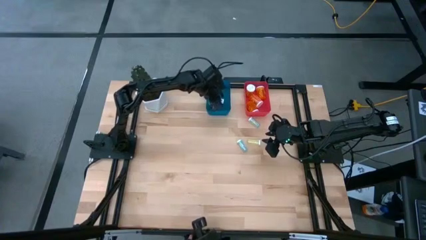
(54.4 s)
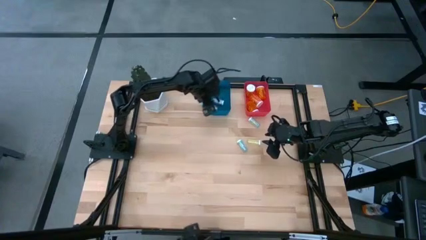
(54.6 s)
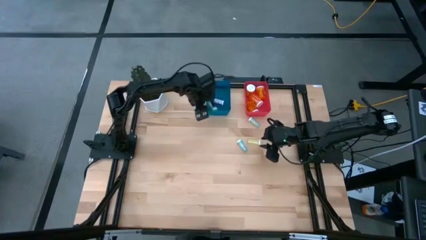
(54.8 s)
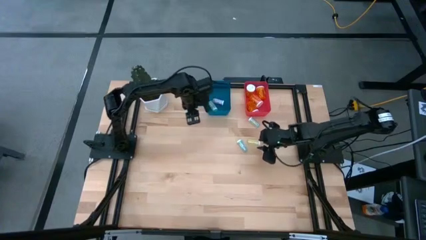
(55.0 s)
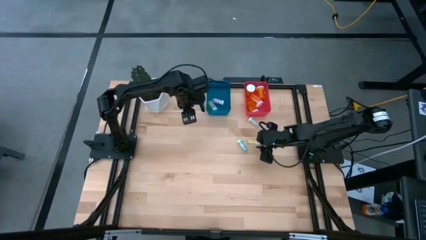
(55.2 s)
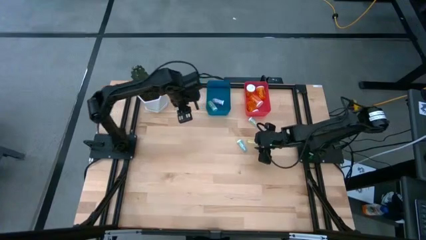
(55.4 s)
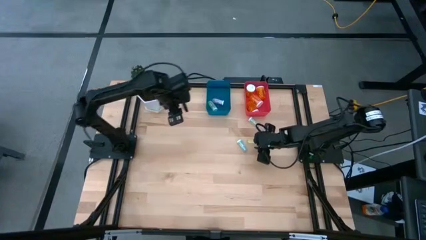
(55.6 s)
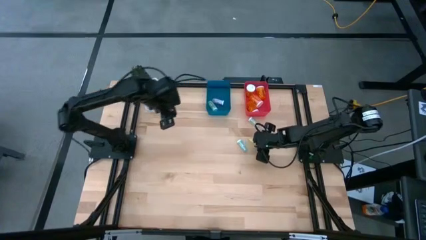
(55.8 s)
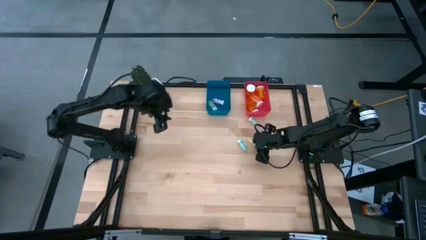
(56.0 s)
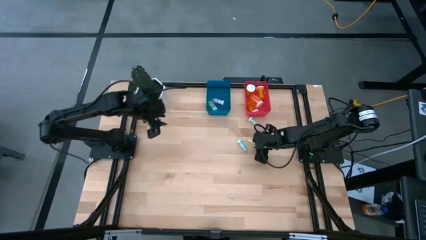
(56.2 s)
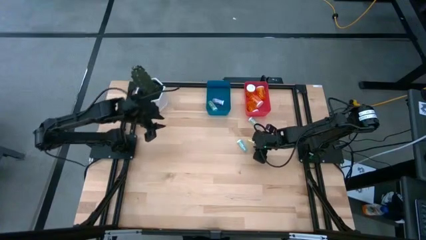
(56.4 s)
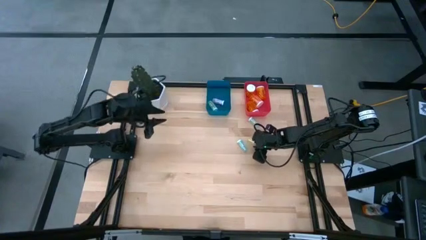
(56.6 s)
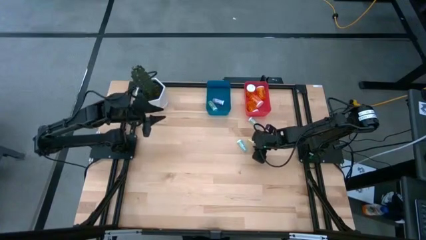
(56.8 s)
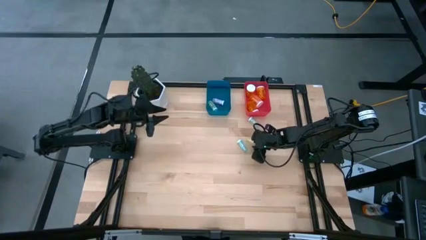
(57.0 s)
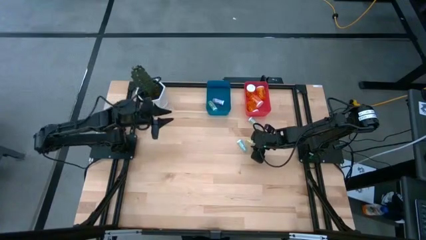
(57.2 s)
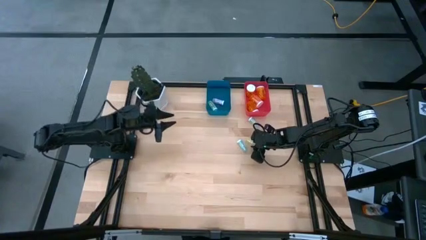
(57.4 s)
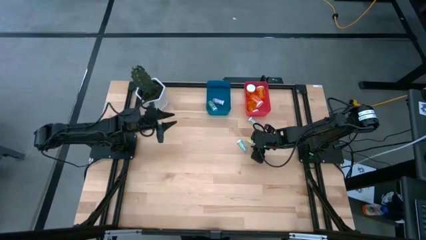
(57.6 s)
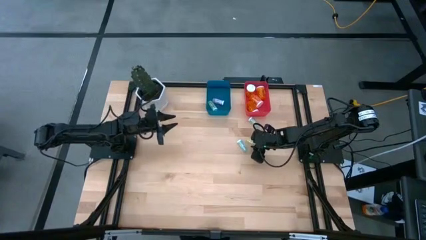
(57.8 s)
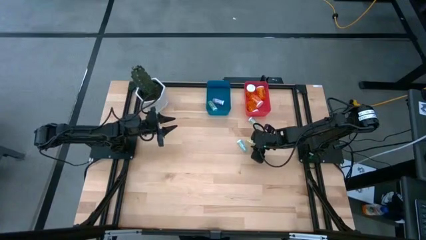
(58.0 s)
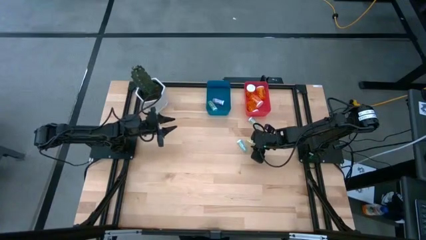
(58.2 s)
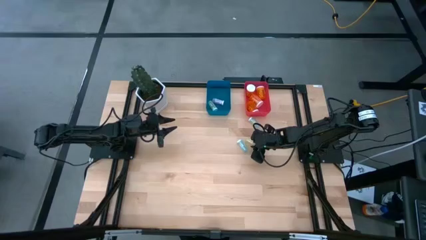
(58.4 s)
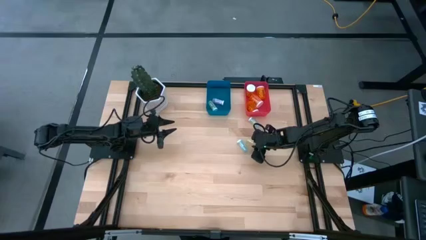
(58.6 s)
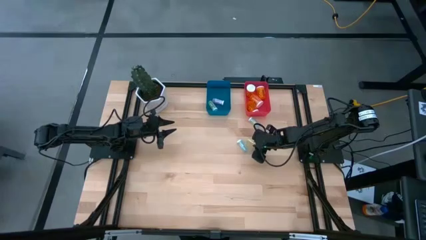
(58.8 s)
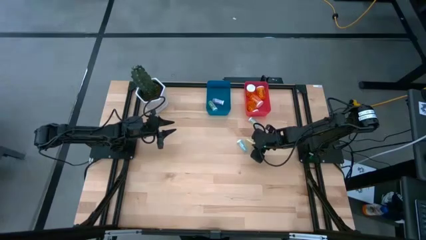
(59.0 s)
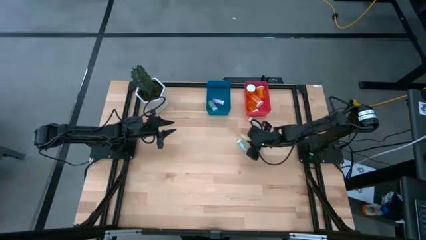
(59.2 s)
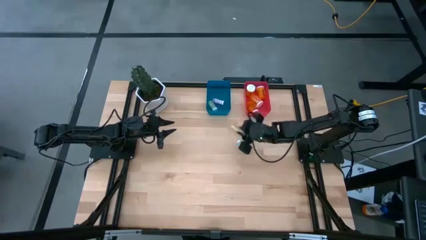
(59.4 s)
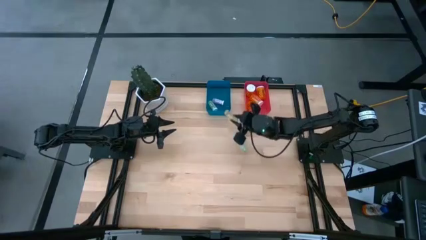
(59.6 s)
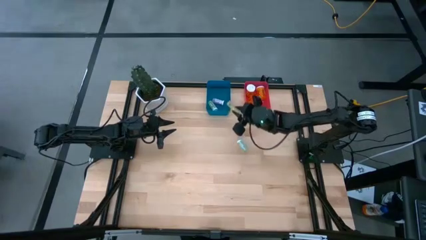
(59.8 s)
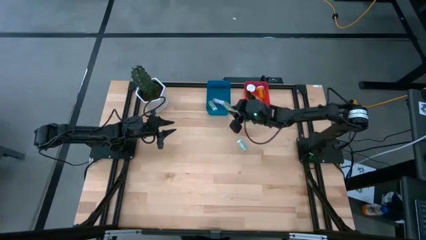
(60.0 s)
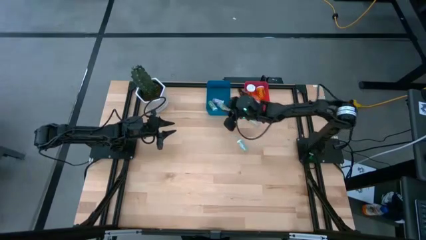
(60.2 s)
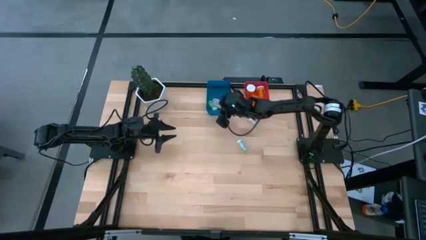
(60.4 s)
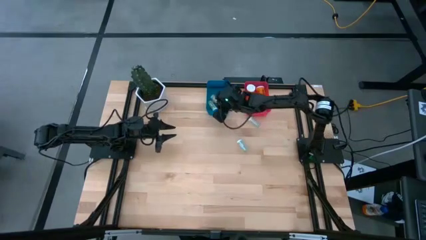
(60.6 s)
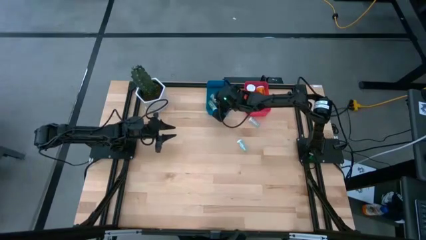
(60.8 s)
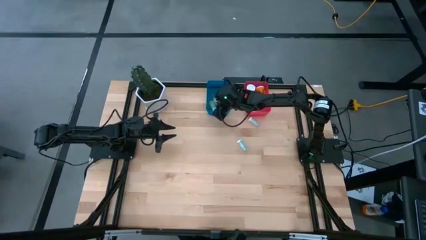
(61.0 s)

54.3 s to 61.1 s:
Task: Pick and place medicine bottles into bin by pill shape (circle, oval)
Put the small yellow pill bottle into the blue bin

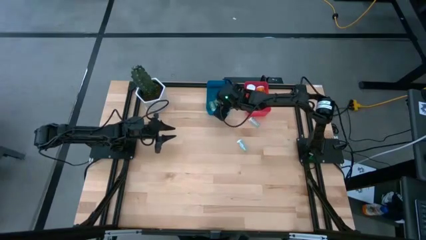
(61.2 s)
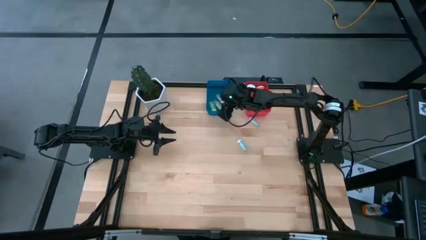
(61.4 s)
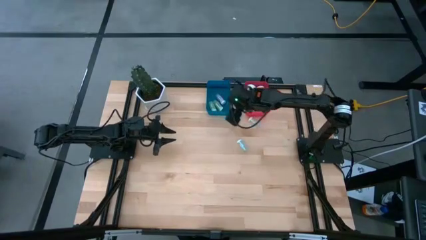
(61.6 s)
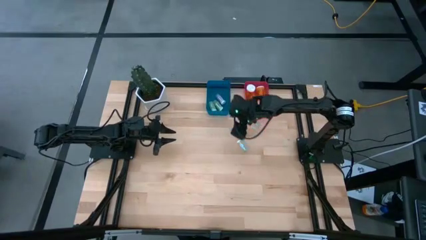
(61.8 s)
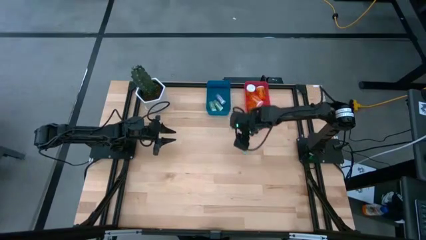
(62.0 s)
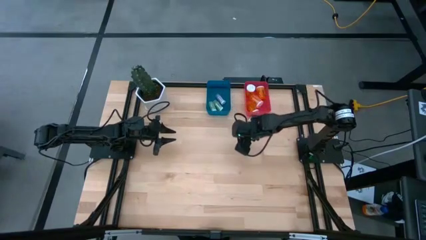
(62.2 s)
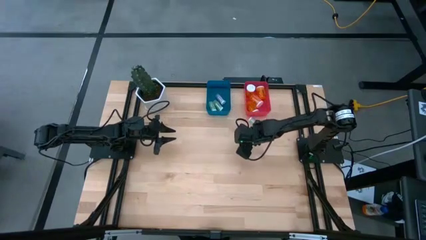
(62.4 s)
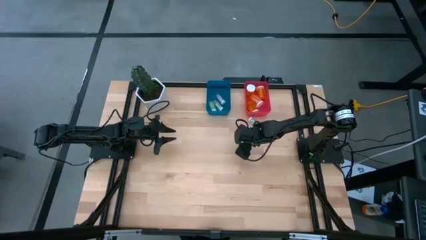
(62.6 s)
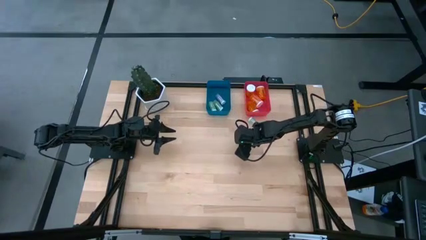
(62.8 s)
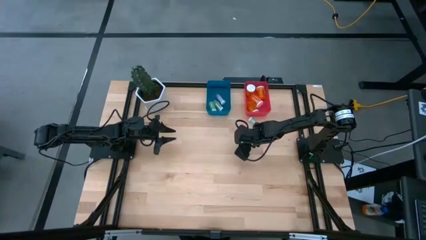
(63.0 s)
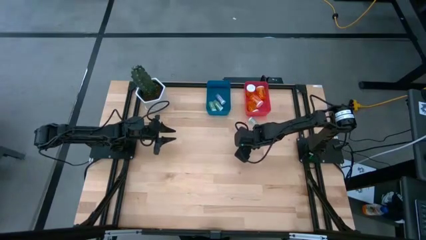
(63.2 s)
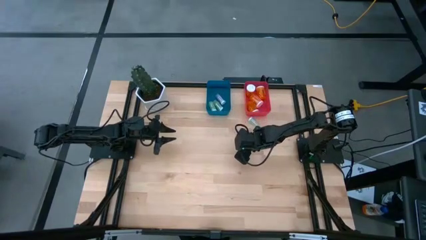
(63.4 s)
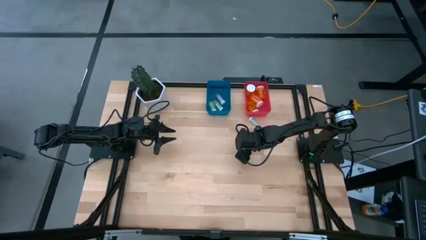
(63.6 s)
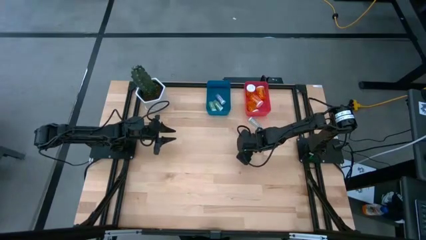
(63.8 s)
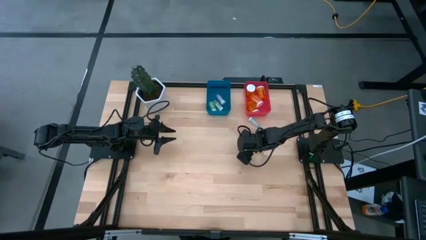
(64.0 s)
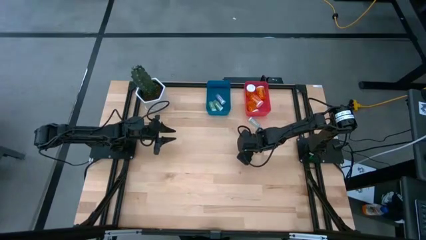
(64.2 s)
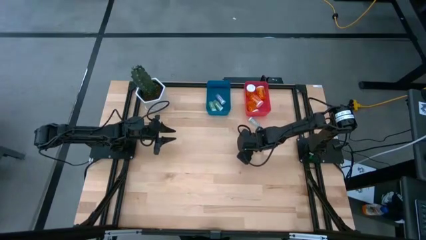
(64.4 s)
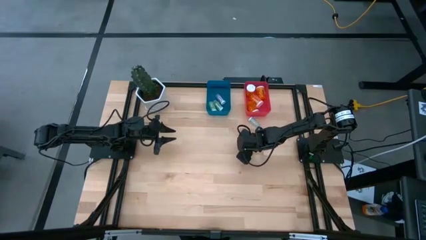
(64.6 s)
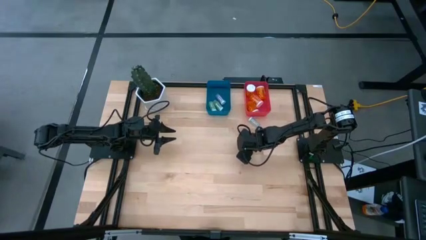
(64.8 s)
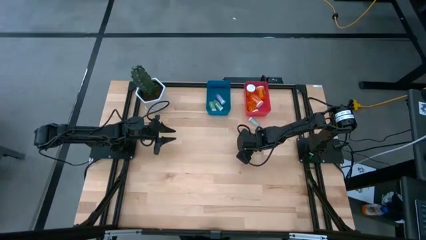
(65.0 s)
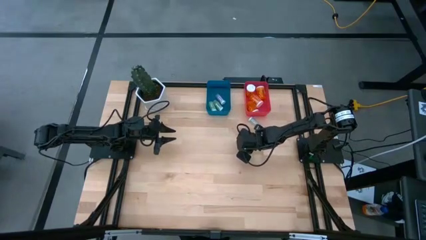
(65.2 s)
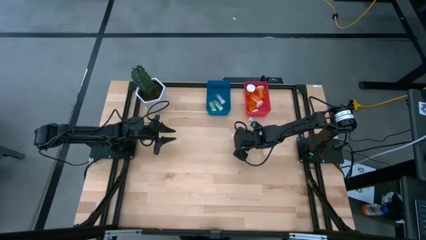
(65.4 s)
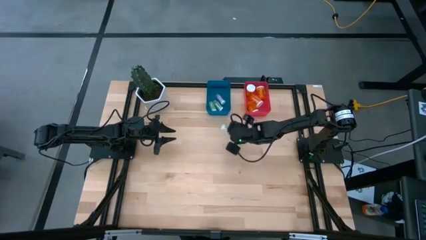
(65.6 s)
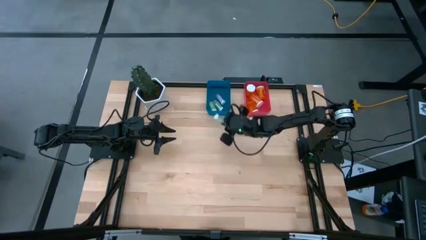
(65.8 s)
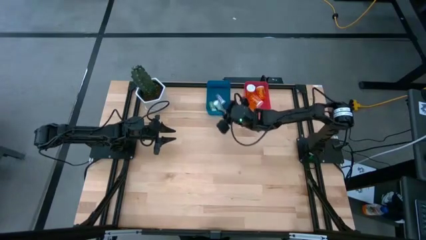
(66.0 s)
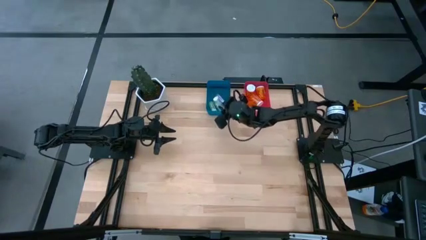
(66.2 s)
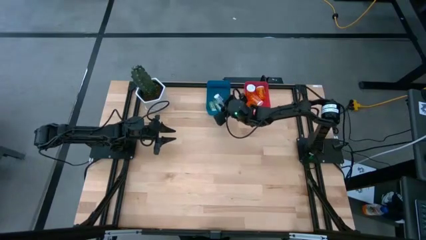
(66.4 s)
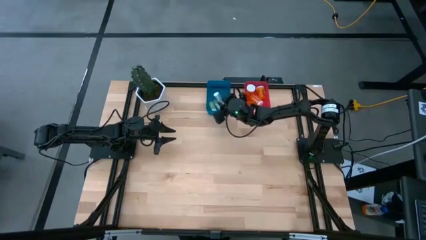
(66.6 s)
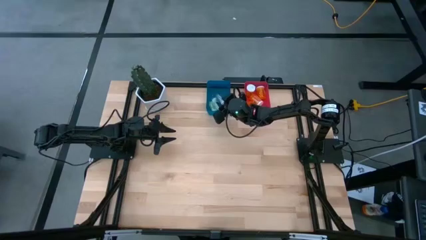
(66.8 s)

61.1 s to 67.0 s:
Put the bottom small blue pill bottle into the blue bin

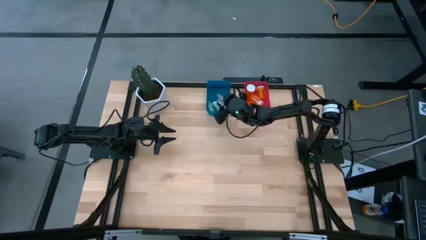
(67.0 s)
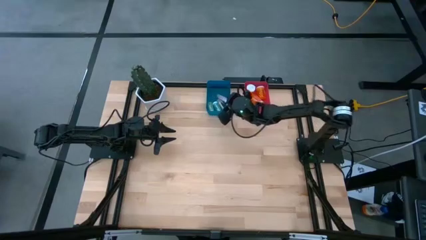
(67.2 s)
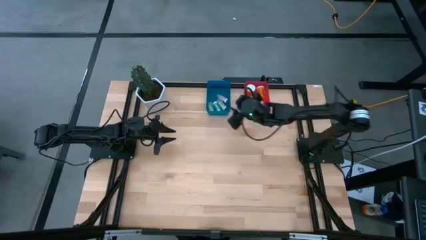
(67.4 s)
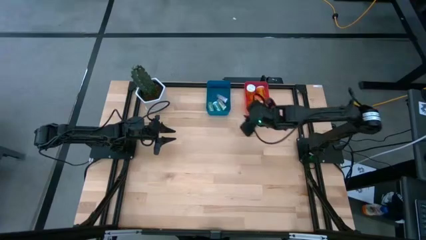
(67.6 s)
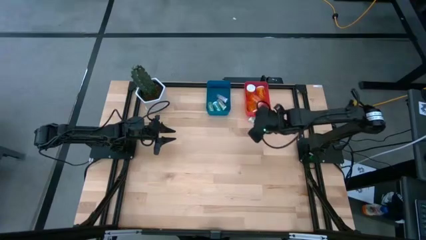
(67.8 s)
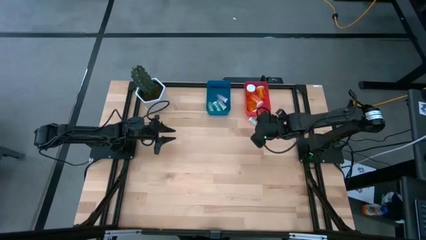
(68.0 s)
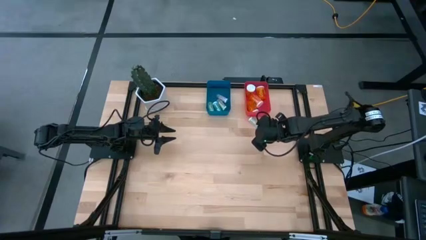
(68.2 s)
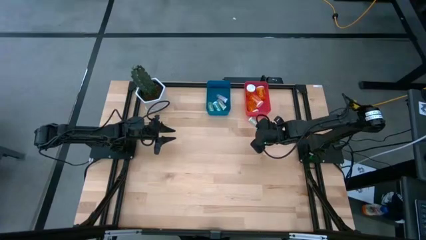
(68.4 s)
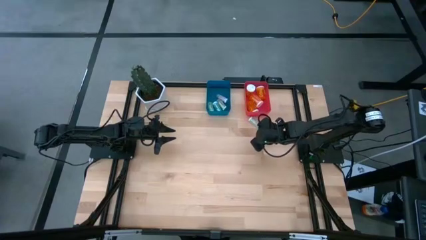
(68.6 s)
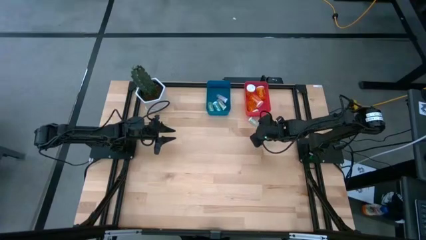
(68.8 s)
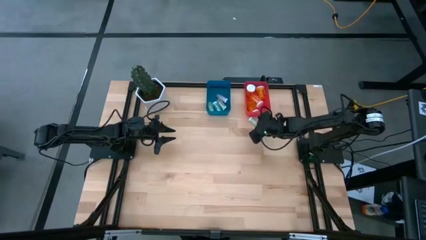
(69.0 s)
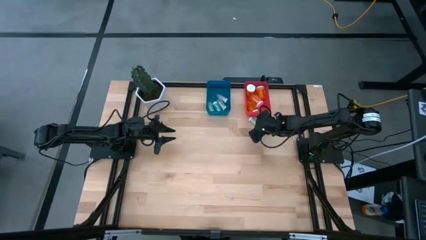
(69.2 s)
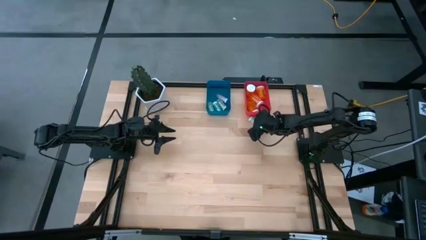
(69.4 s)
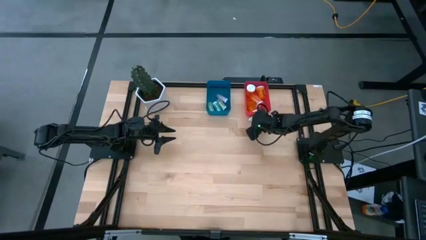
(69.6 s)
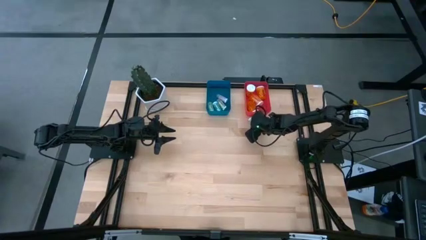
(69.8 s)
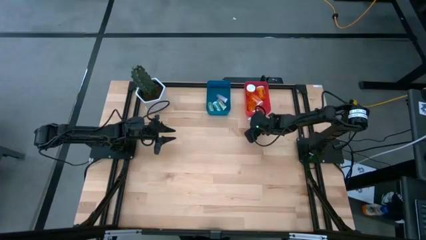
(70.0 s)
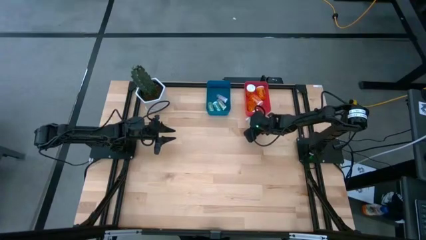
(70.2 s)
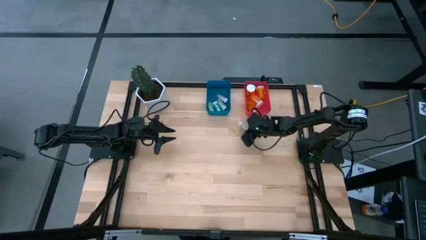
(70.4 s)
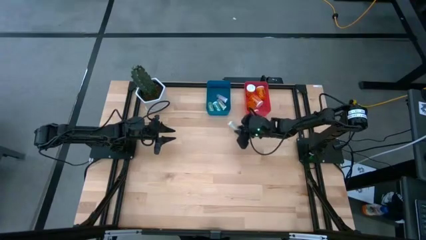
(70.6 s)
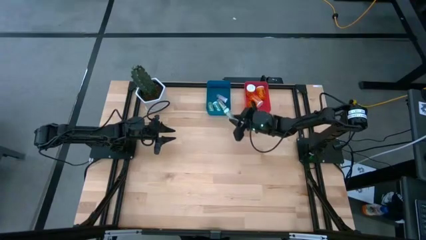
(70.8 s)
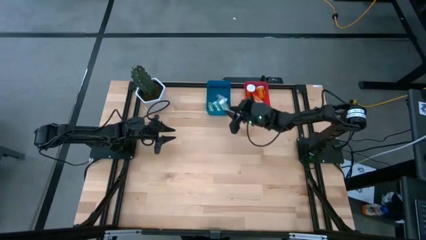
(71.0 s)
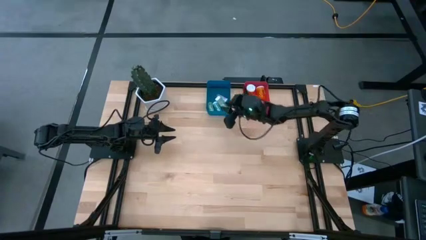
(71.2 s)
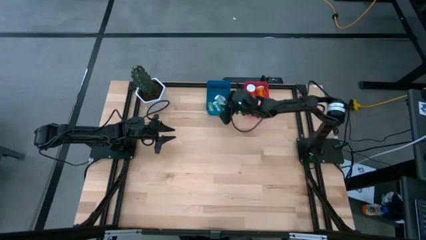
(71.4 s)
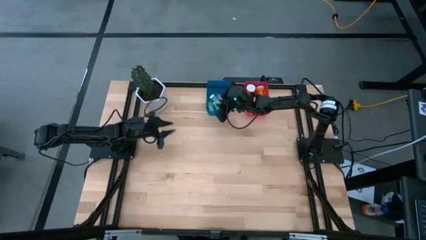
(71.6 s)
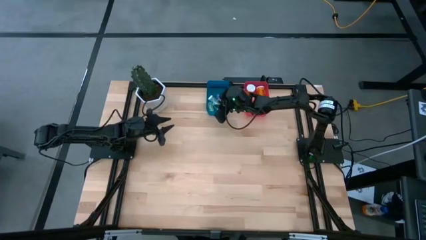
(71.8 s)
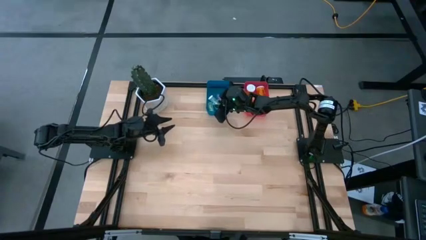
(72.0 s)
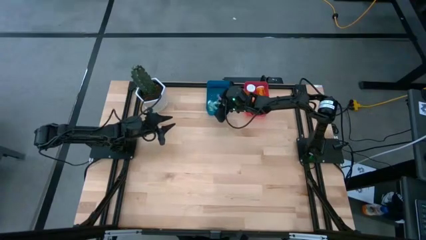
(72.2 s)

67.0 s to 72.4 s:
Put the small blue pill bottle into the blue bin
